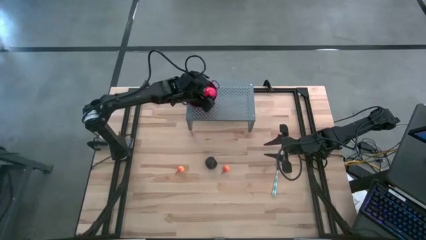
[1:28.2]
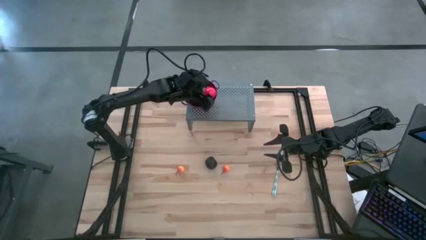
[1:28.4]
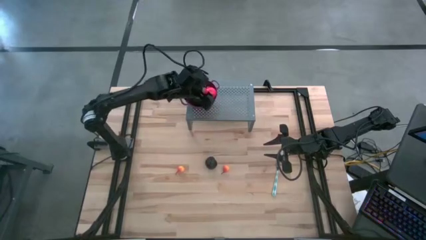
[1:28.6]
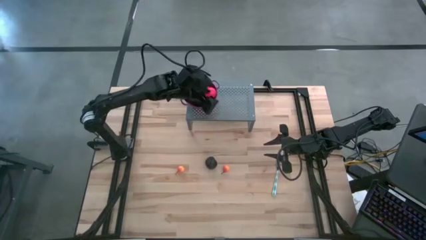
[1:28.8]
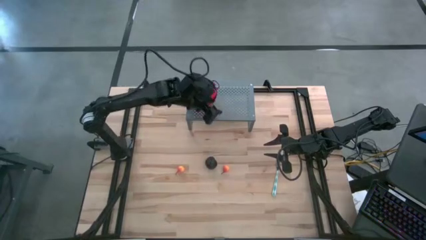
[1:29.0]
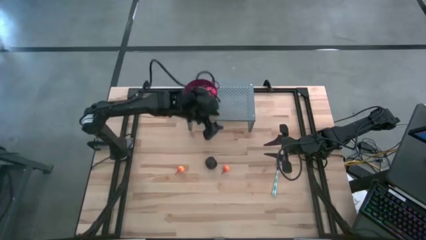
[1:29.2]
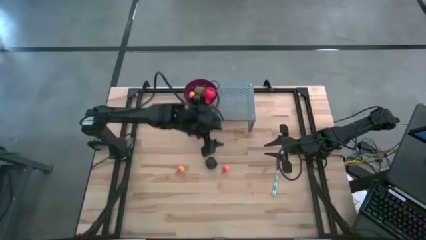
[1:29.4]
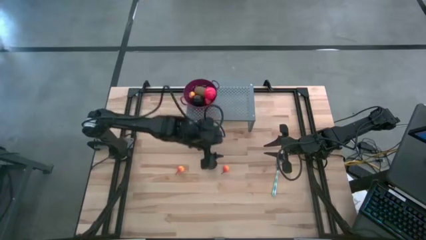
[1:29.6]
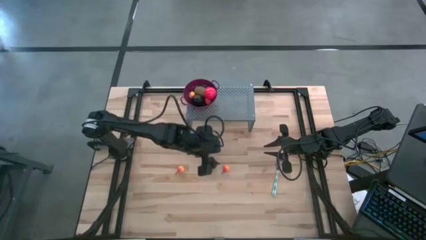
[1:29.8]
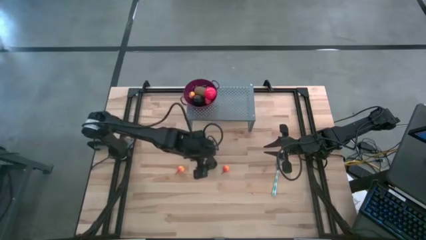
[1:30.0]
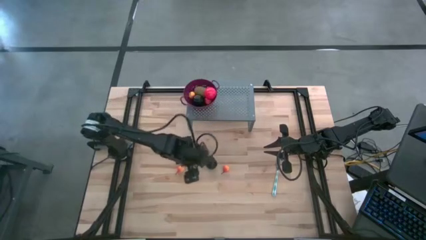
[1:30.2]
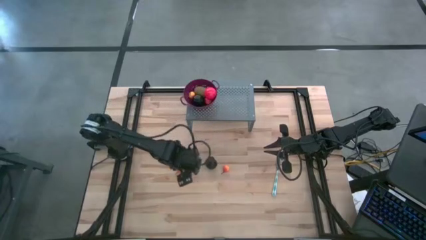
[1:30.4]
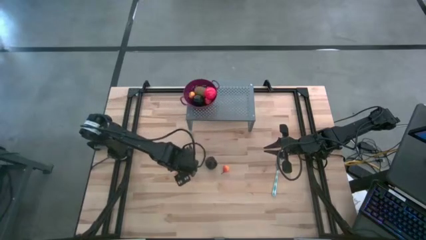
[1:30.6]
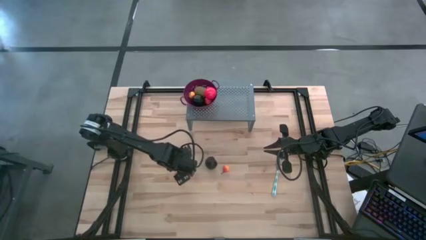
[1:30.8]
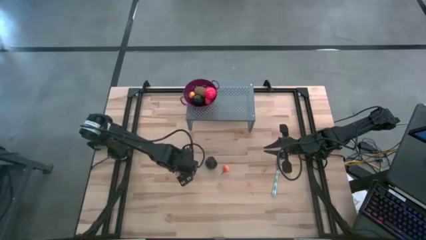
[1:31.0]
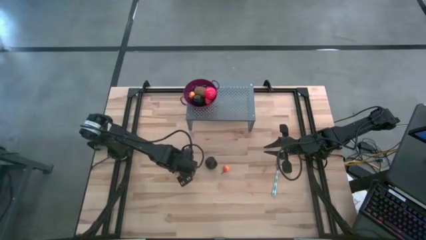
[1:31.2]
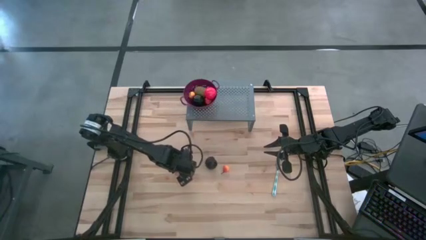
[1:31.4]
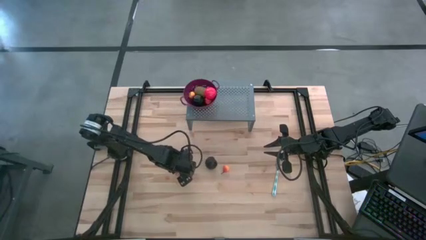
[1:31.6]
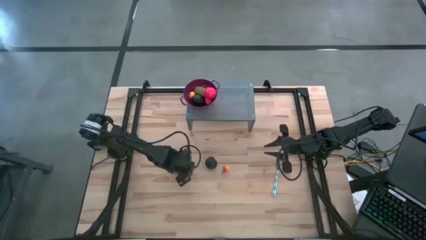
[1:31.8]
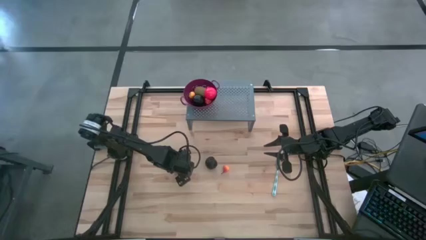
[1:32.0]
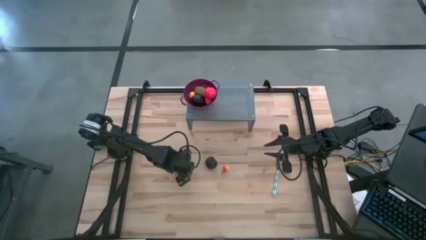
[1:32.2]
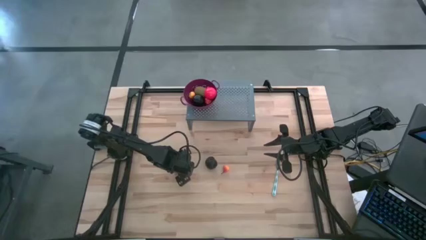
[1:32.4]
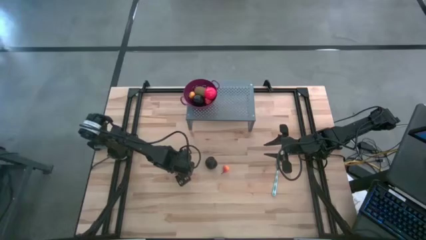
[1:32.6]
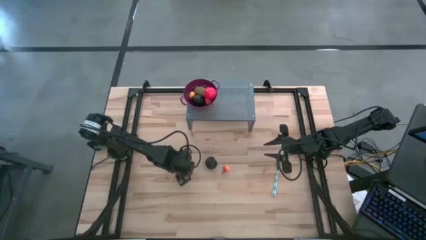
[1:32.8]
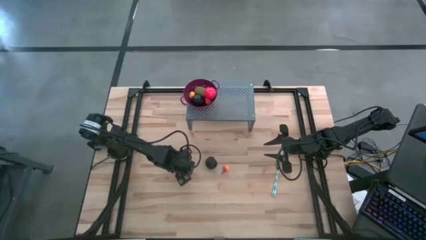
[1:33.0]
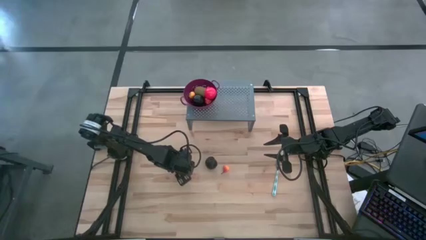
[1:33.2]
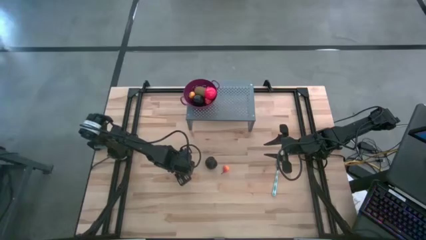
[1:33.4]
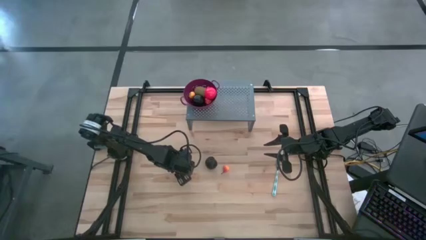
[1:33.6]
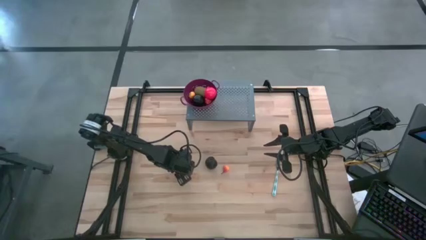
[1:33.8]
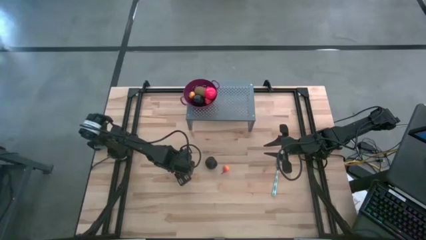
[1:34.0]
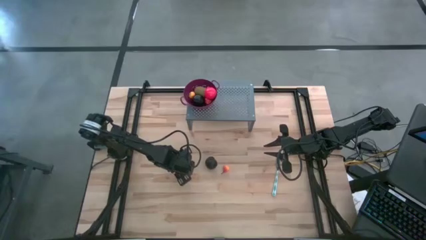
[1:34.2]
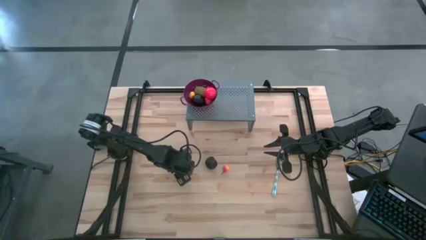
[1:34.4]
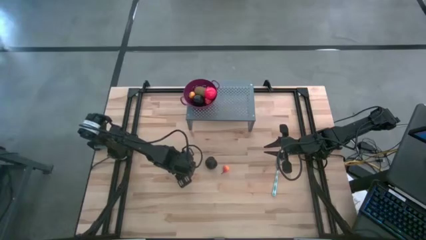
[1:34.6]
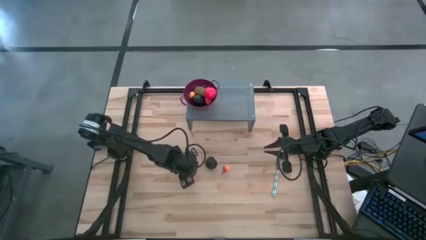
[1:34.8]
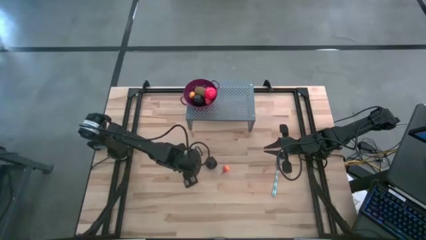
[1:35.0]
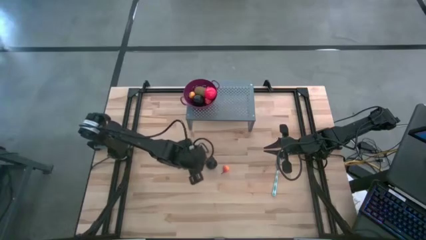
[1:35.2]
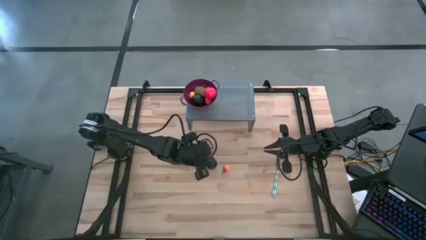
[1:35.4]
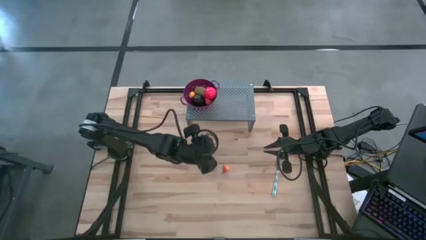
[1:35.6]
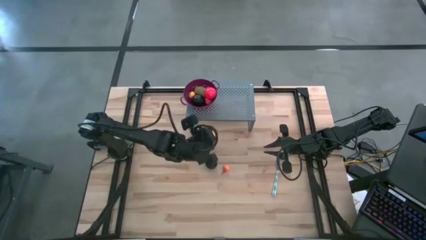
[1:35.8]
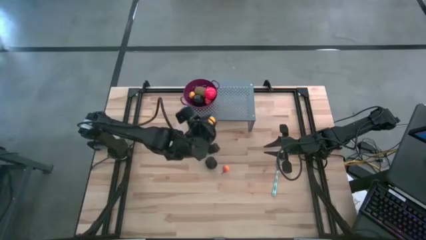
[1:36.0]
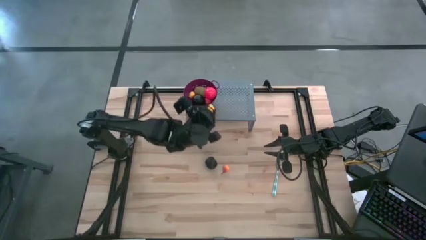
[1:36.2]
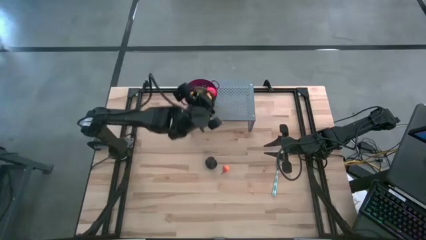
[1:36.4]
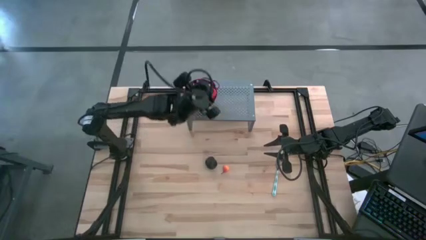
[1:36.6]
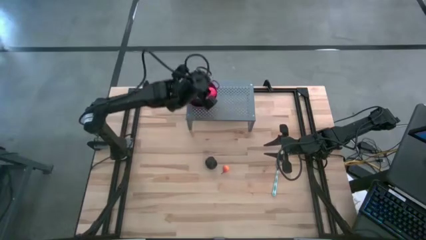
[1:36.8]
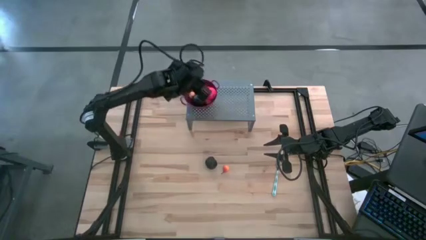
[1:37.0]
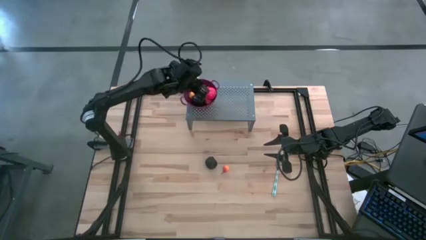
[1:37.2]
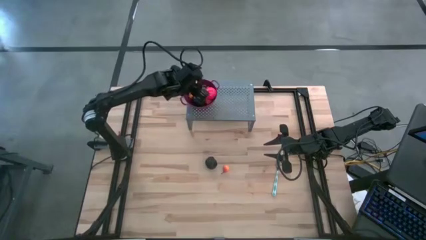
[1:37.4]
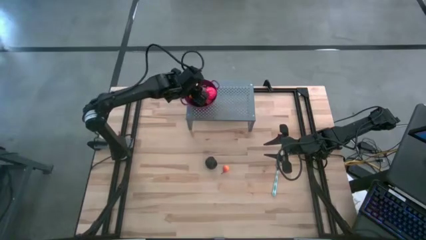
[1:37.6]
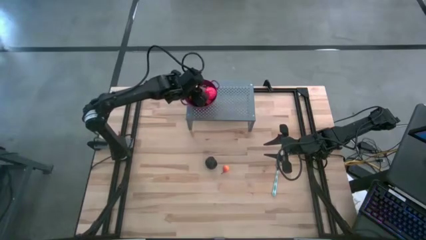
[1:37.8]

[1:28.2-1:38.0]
Task: Pick & Place Fruit
Put the yellow pear into the purple strainer bowl on the shelf

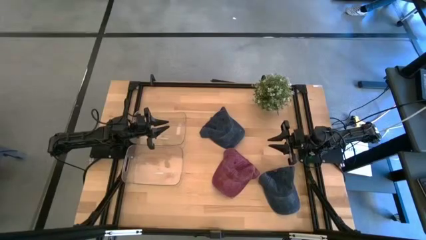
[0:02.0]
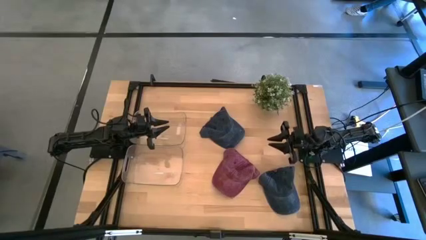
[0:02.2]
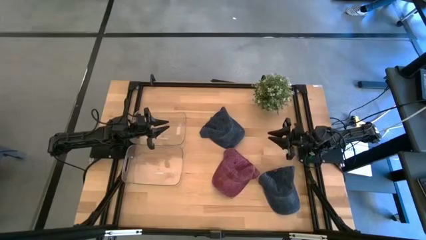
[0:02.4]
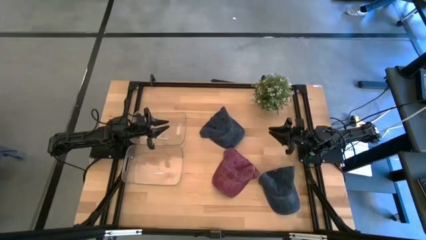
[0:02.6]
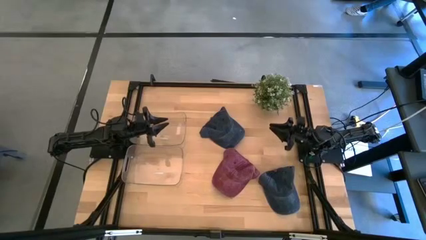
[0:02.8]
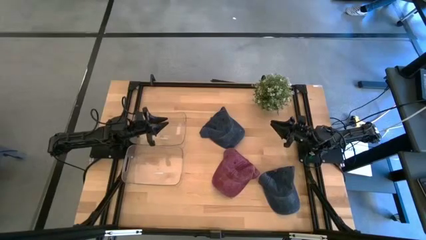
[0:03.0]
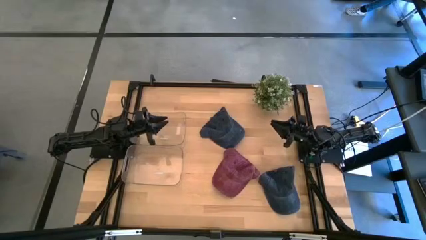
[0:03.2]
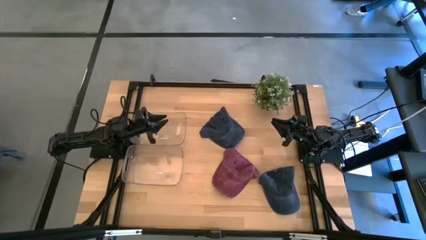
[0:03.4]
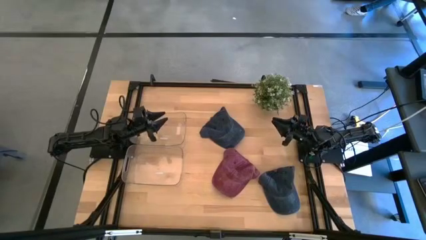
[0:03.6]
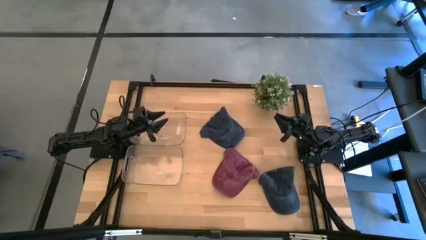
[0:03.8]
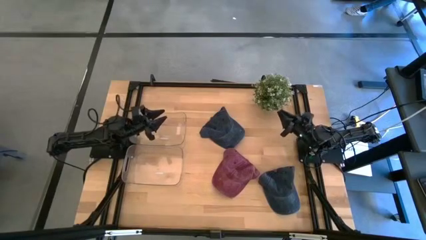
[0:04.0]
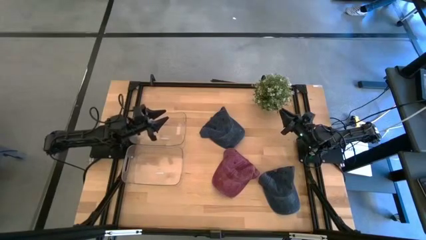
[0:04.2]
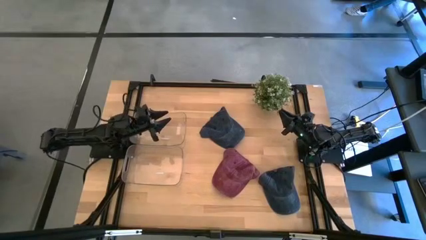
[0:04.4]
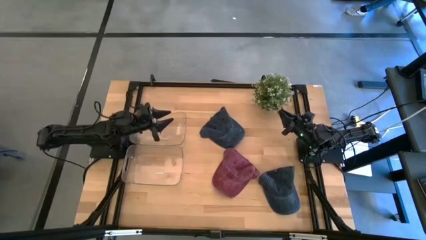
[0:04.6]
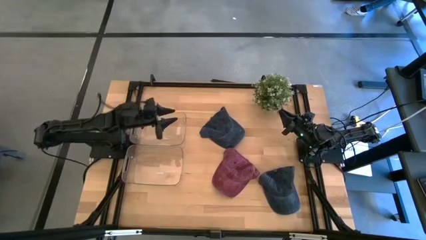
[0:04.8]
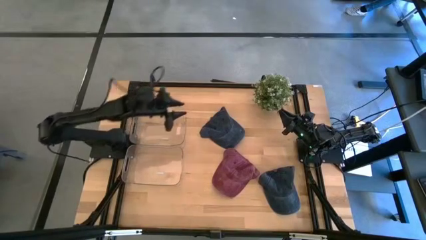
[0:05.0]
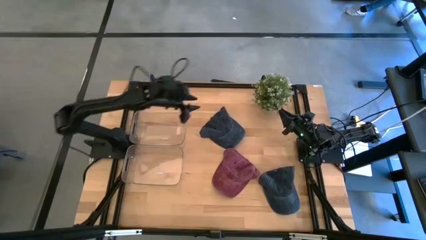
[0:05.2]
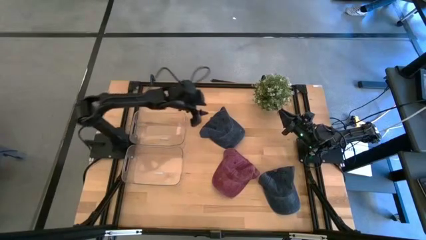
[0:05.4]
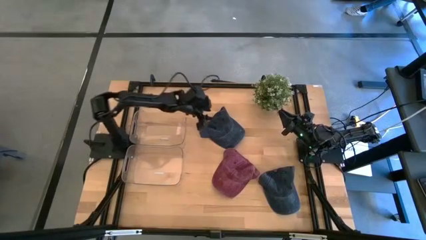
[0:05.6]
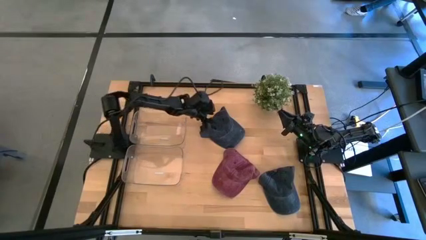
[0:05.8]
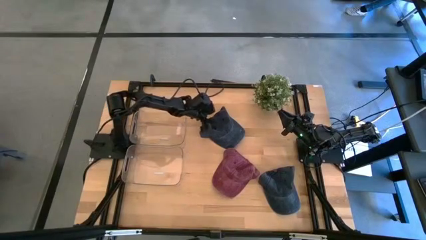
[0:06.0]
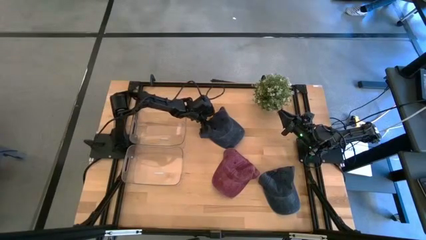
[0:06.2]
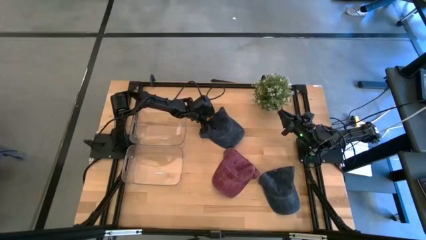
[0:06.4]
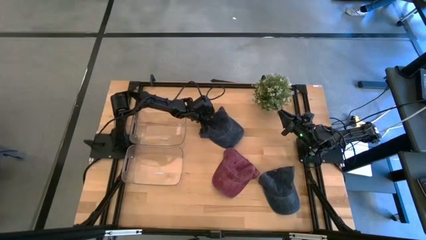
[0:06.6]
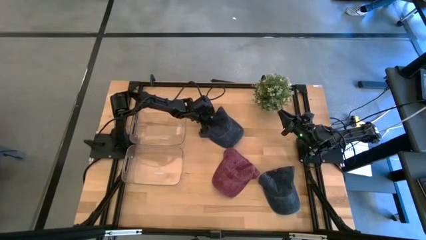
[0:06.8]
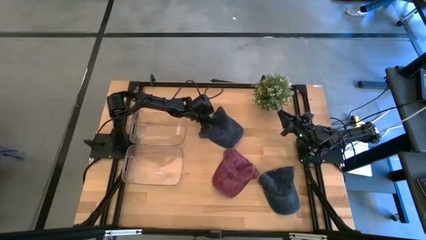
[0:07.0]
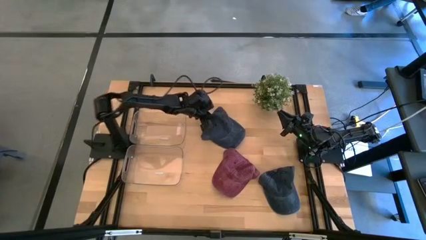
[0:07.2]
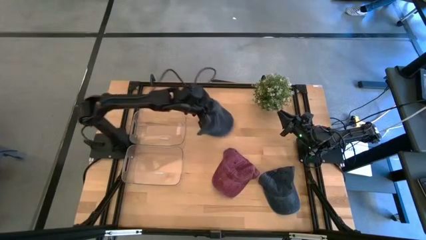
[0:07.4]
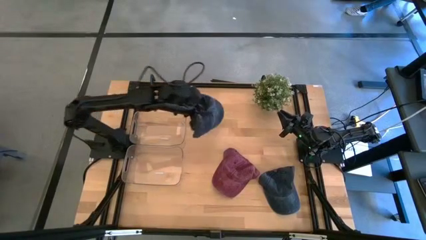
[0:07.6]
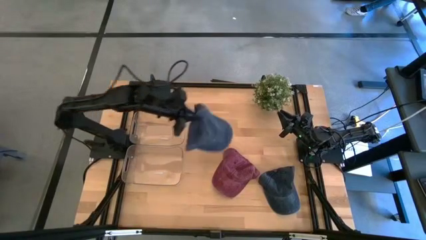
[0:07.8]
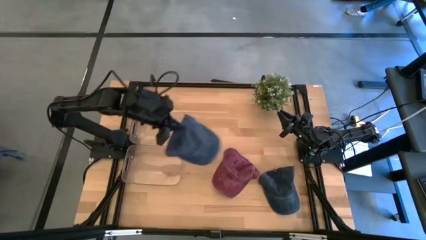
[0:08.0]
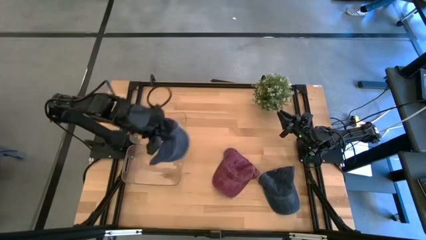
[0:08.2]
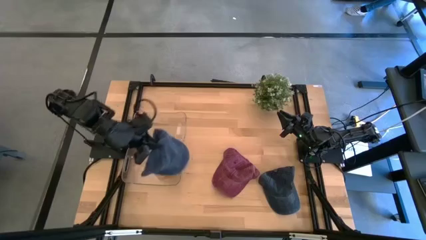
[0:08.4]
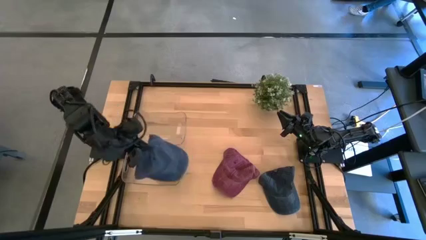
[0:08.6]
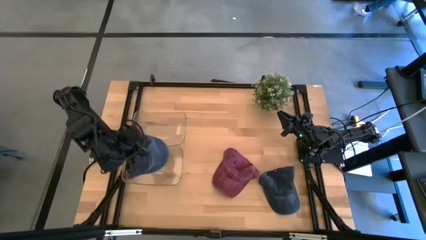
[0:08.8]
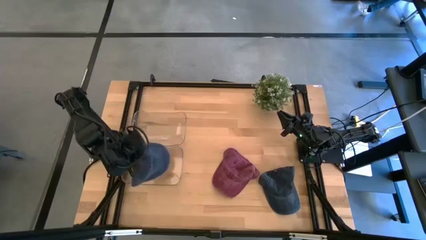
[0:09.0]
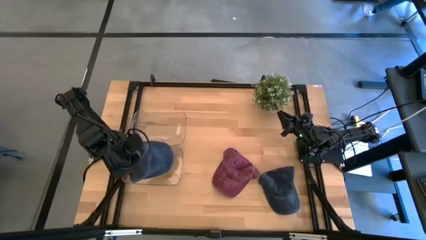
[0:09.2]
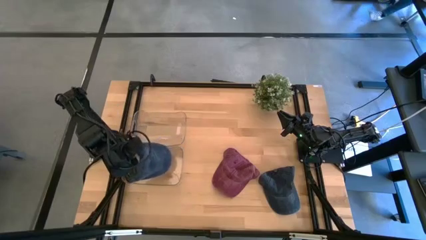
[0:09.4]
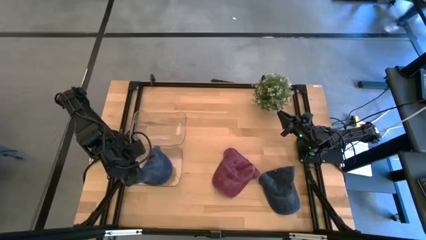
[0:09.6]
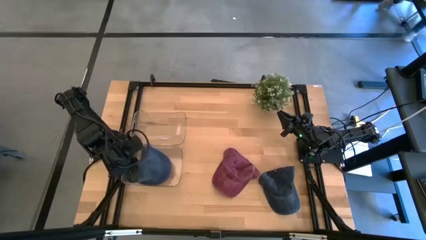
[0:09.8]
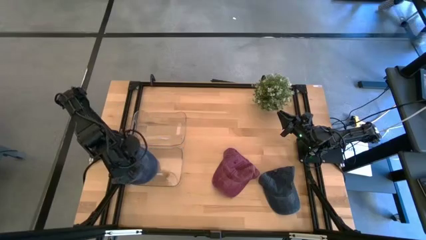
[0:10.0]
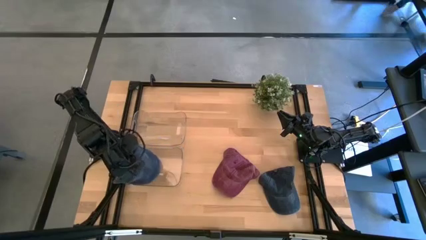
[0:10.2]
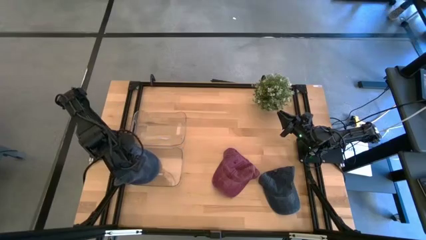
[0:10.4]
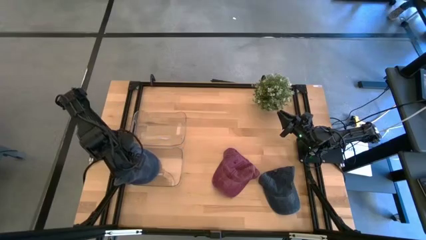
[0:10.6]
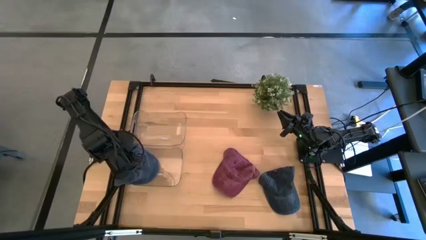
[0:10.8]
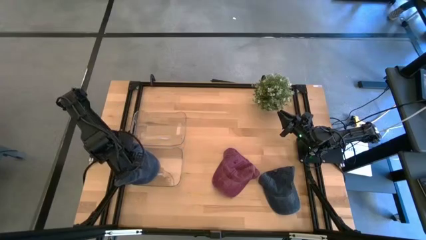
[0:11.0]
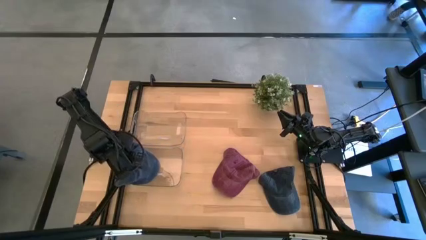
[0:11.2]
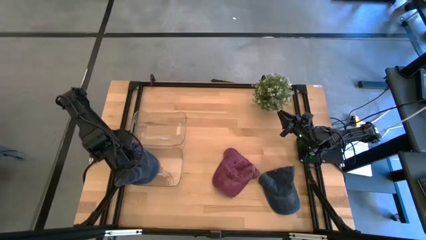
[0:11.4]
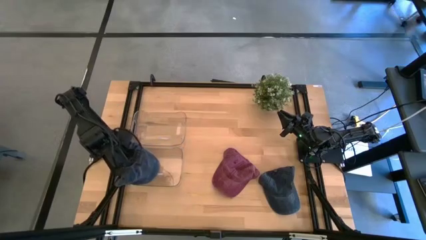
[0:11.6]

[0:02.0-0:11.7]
Task: Pick & Place hat
Put the top blue cap into the bottom transparent bin
